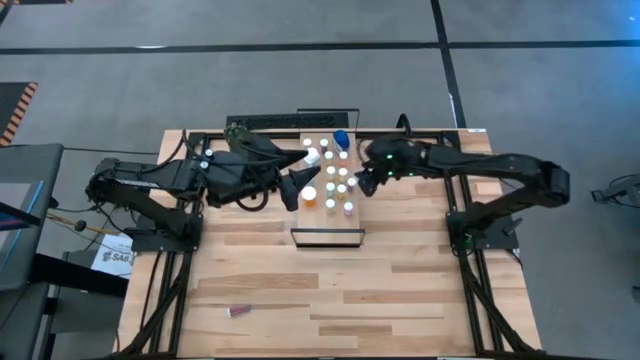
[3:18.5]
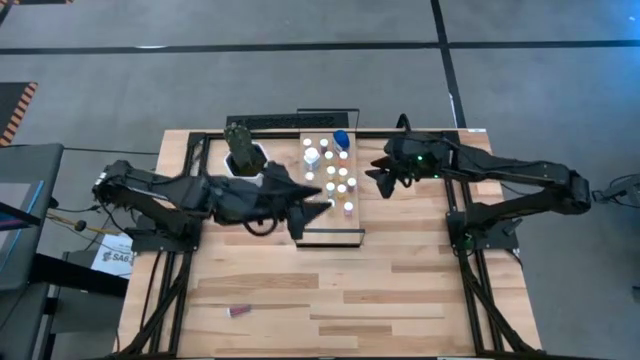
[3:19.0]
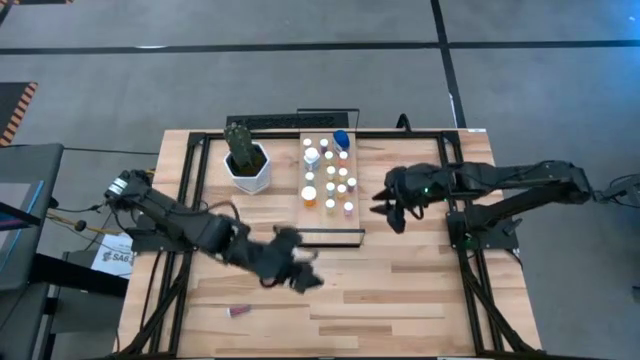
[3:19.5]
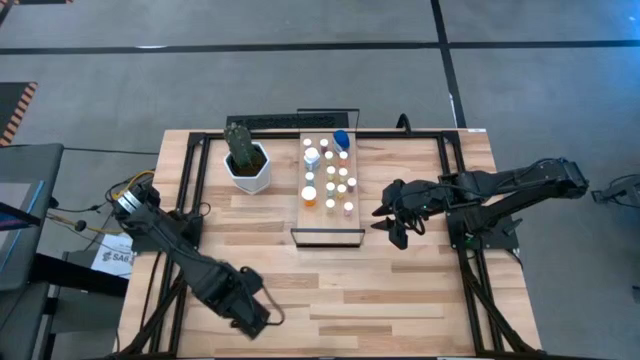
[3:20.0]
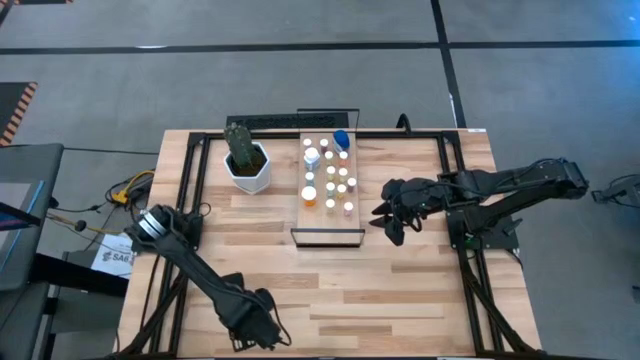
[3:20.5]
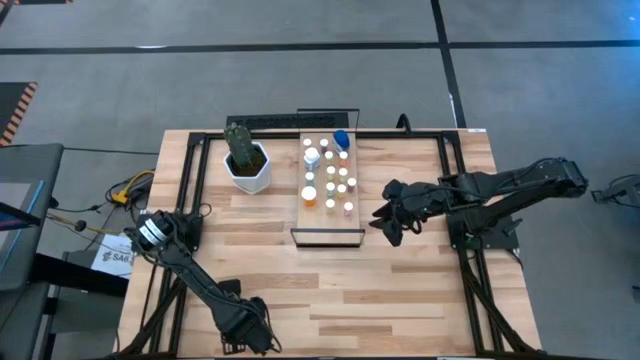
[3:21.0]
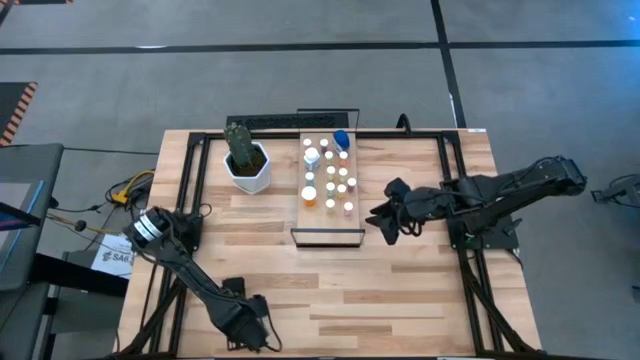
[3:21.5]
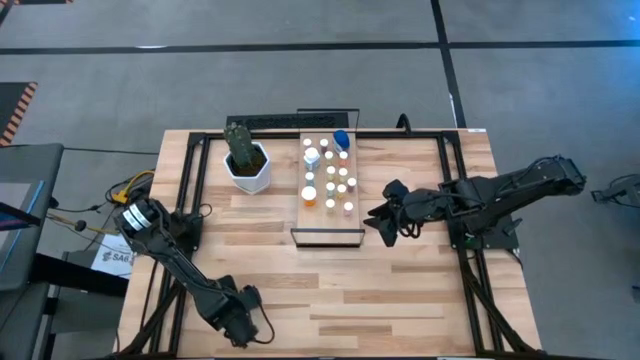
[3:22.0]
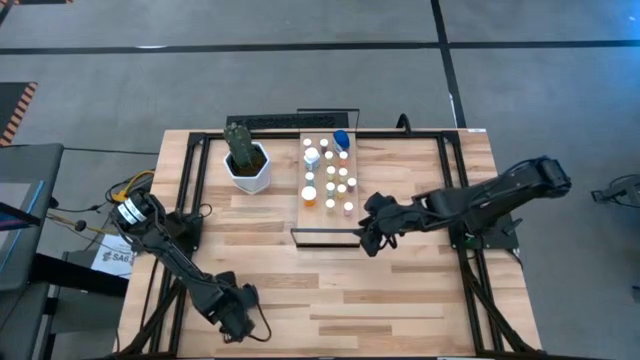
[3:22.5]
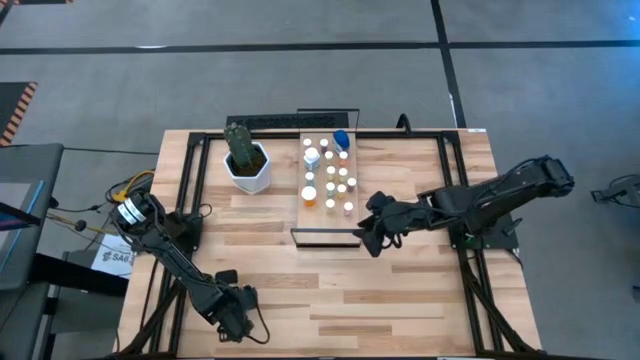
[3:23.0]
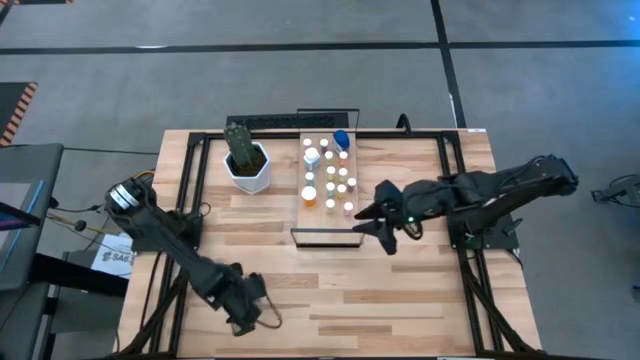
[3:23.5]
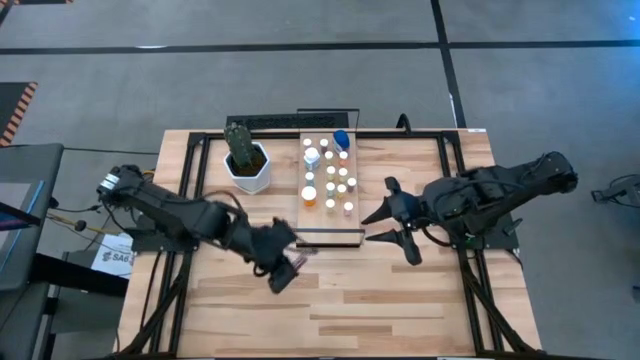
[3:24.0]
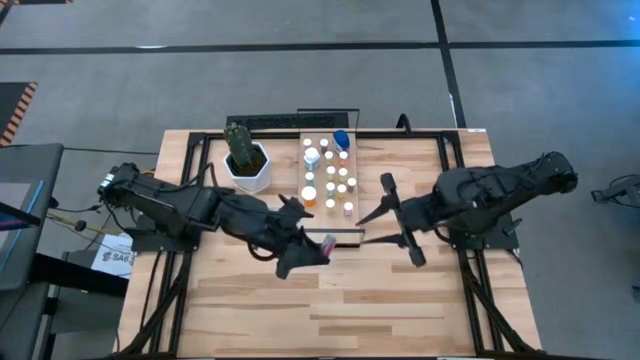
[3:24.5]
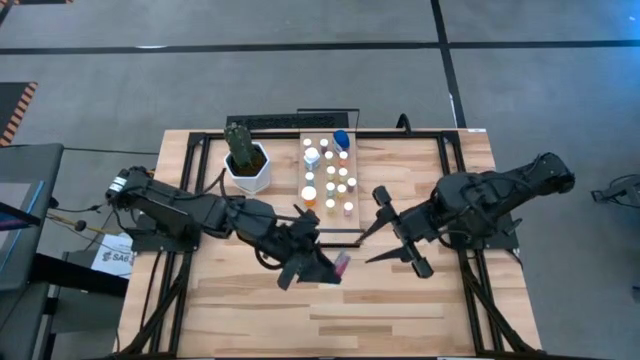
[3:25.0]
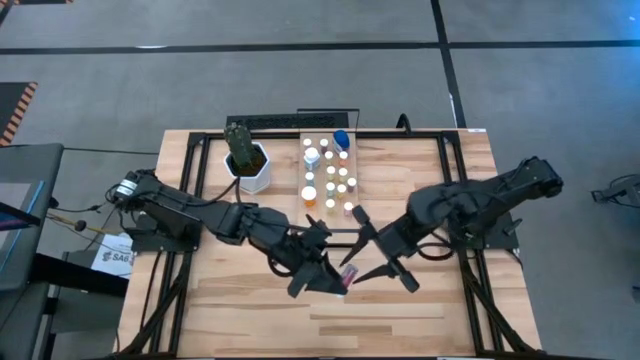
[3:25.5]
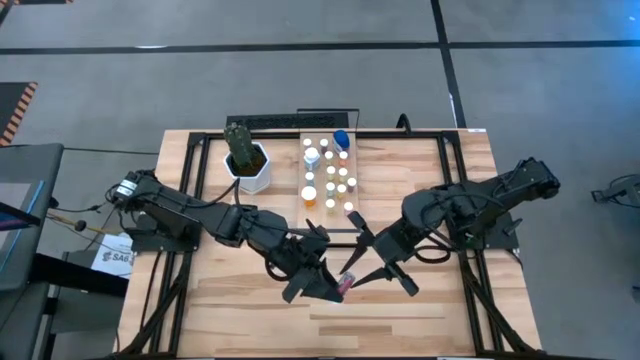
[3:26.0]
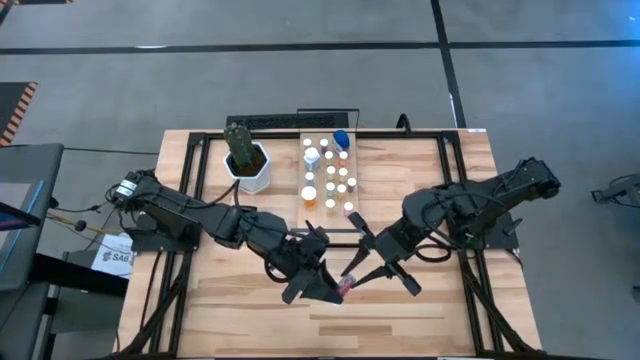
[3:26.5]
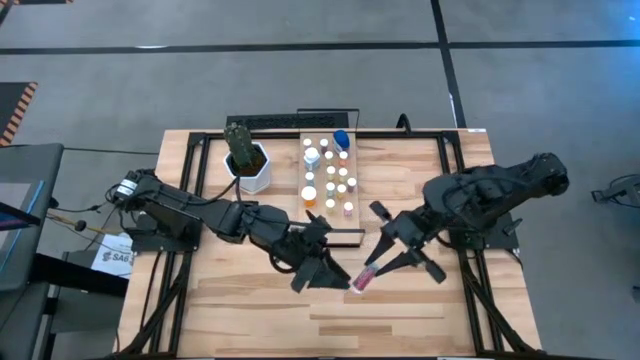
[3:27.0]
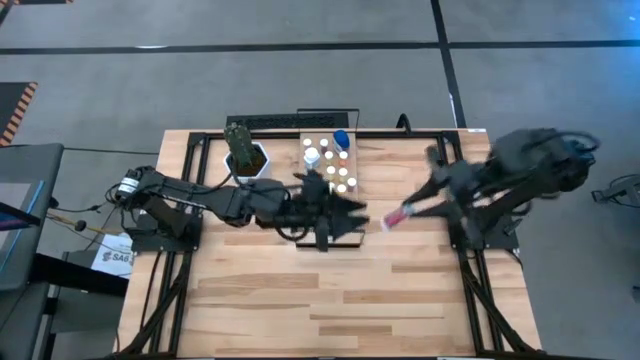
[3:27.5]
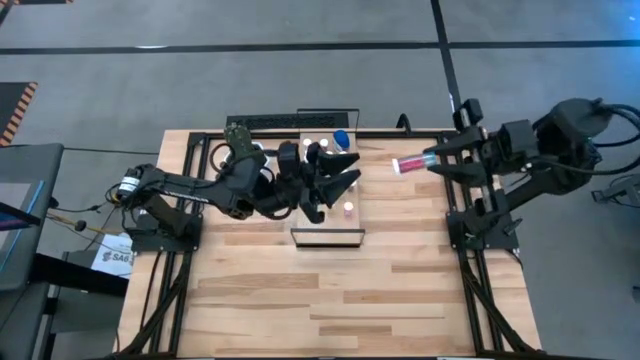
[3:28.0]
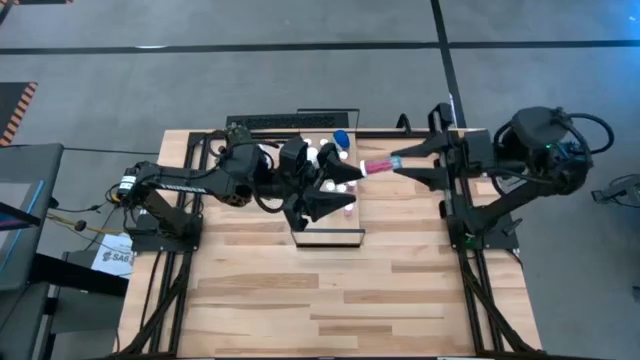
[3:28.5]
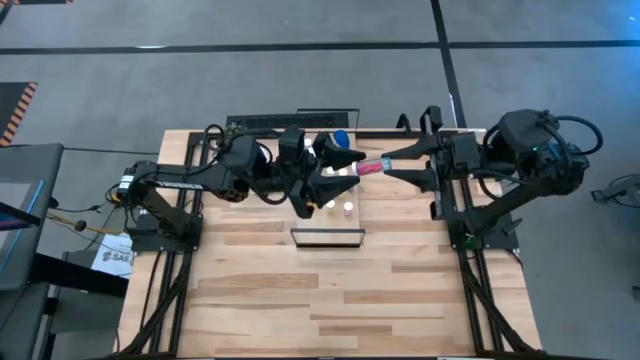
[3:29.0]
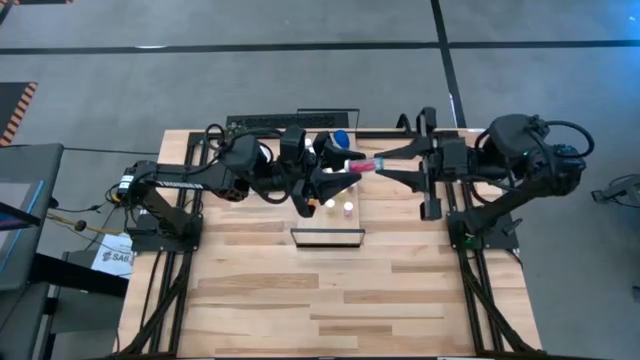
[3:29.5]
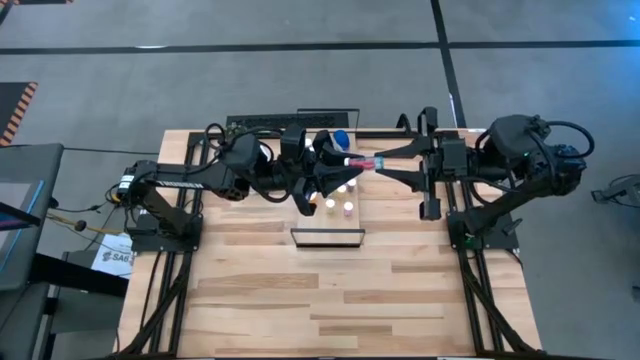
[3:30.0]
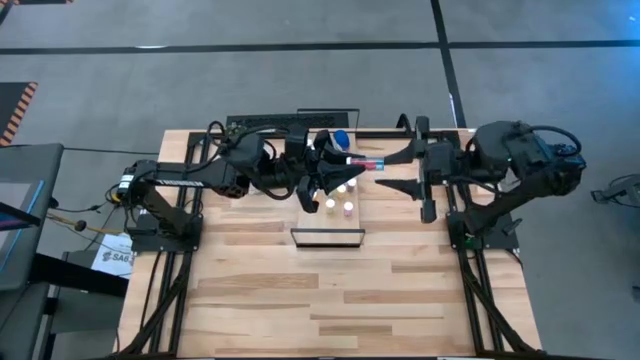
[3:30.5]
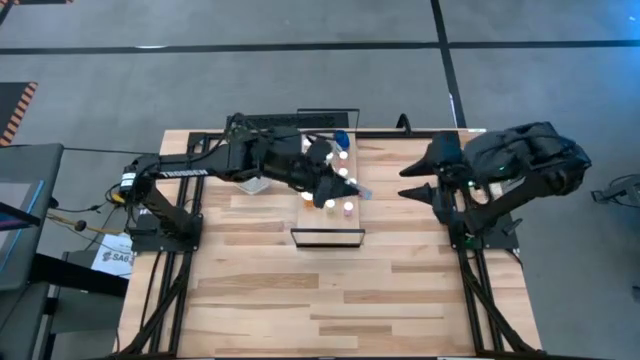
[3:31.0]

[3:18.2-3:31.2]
Task: Pick and place medicine bottles onto shelf by color
Put the blue pill bottle on the shelf

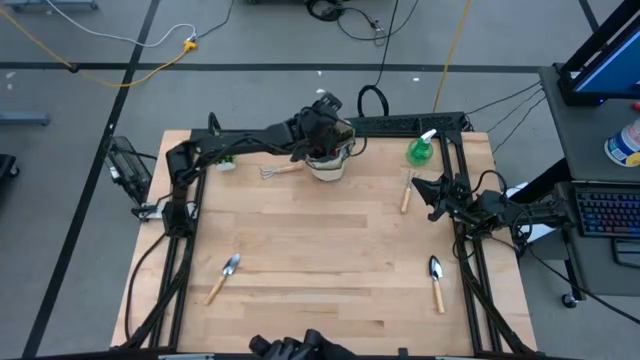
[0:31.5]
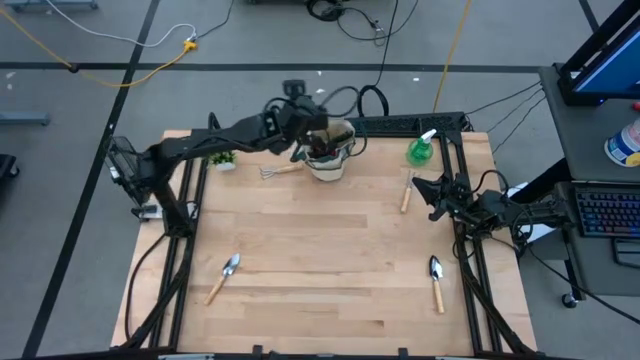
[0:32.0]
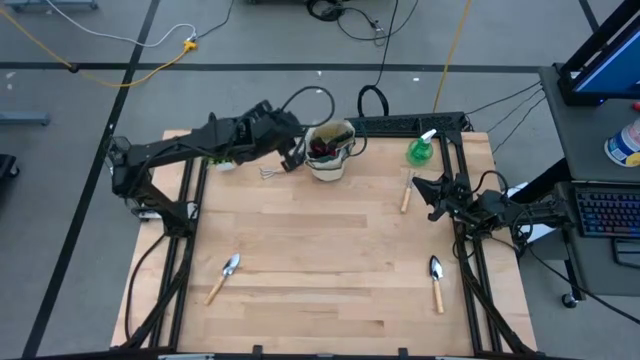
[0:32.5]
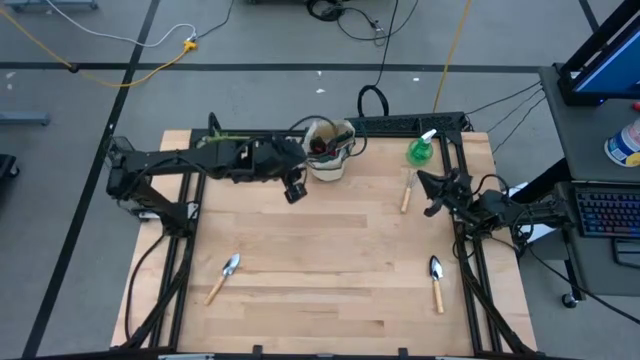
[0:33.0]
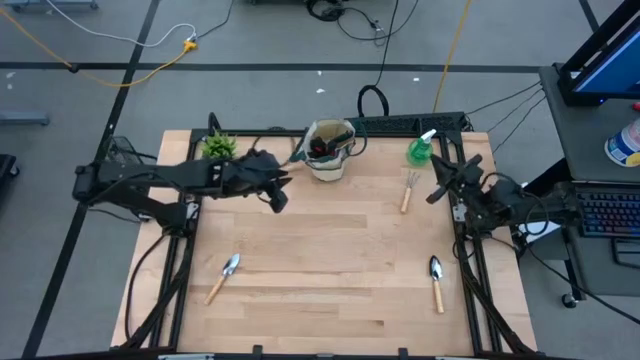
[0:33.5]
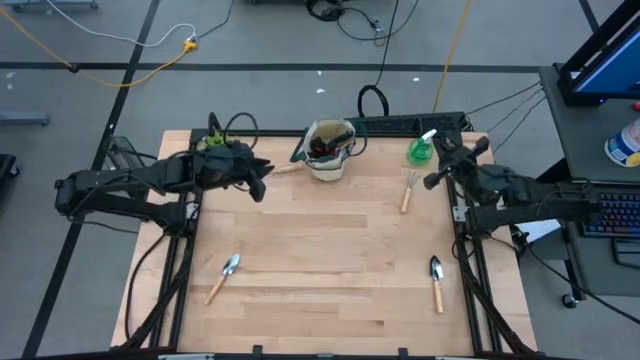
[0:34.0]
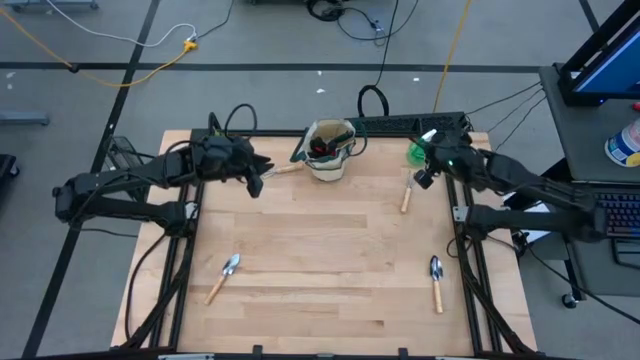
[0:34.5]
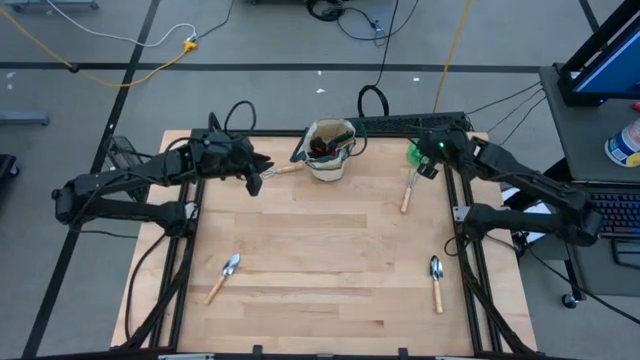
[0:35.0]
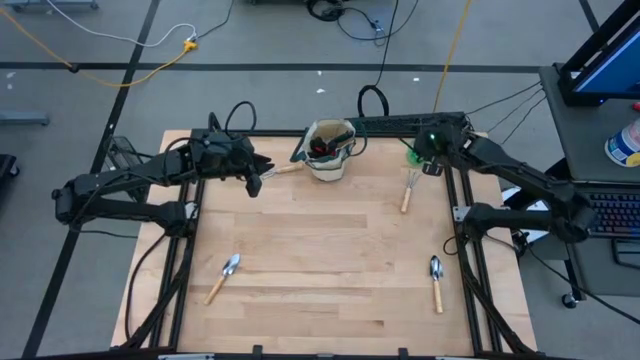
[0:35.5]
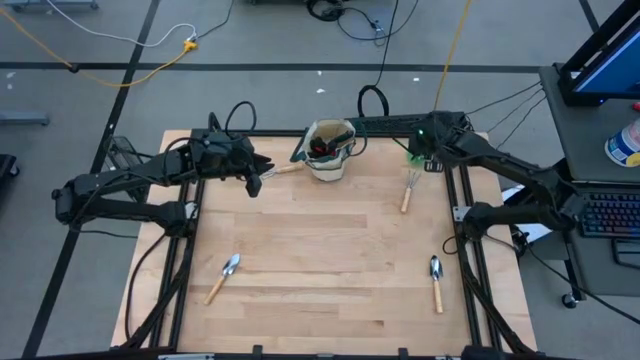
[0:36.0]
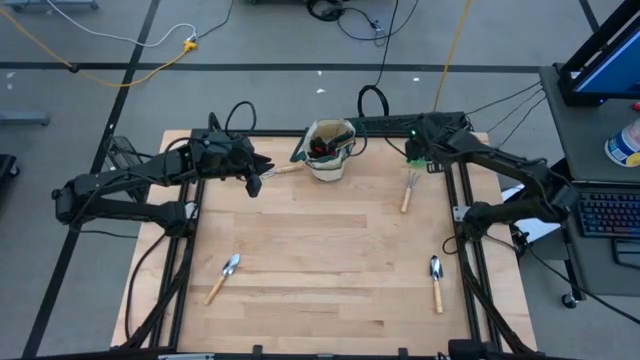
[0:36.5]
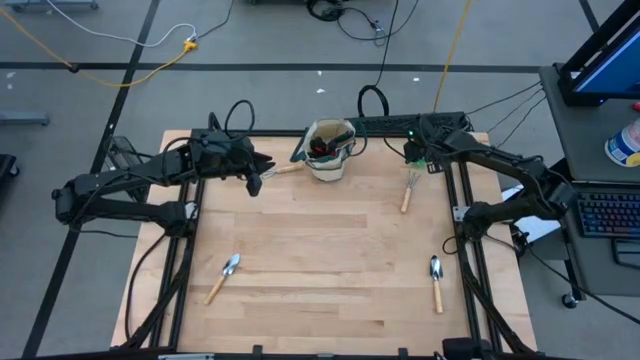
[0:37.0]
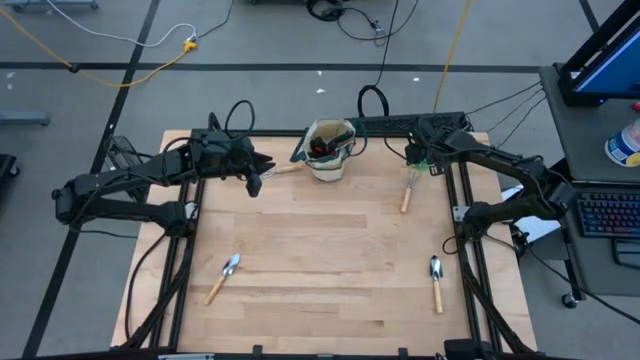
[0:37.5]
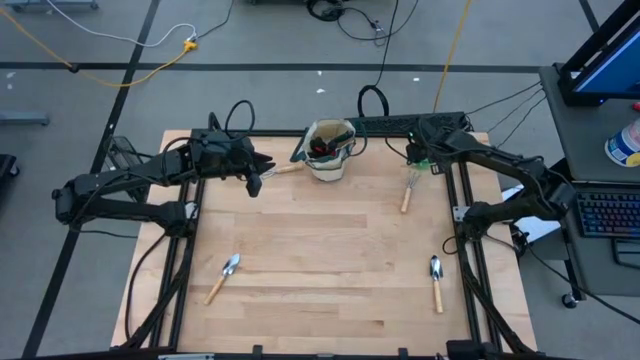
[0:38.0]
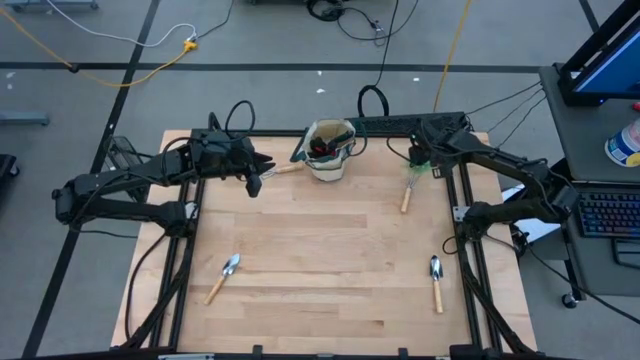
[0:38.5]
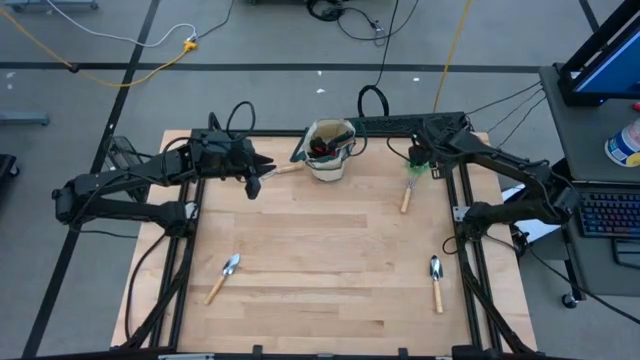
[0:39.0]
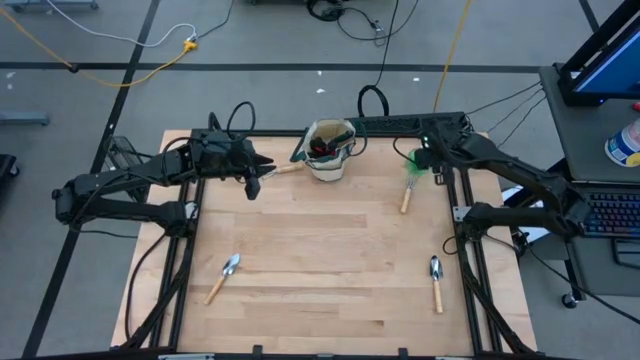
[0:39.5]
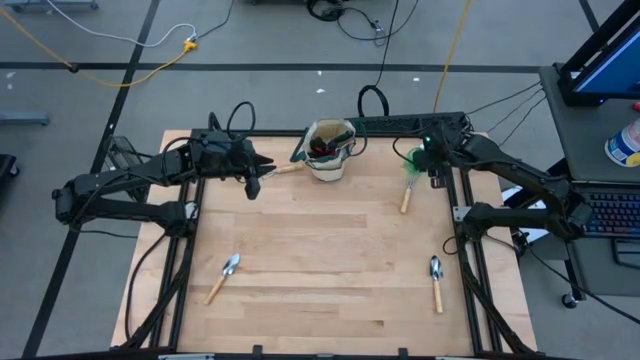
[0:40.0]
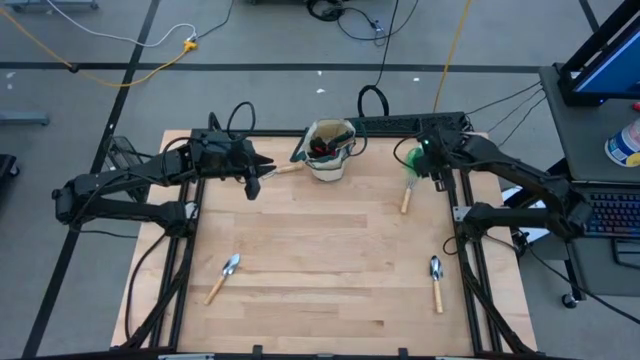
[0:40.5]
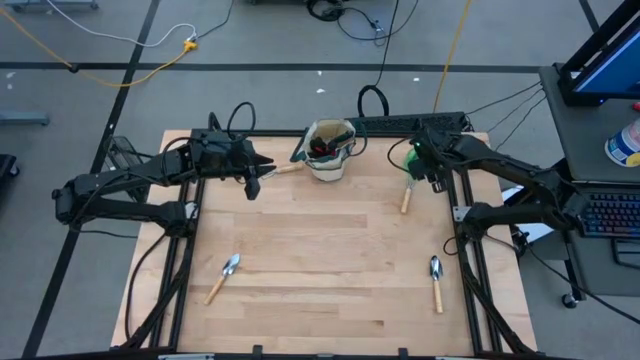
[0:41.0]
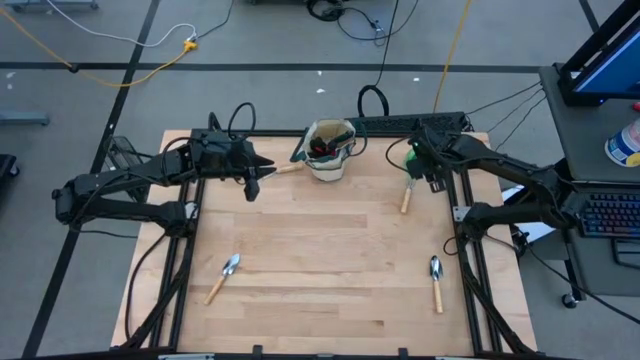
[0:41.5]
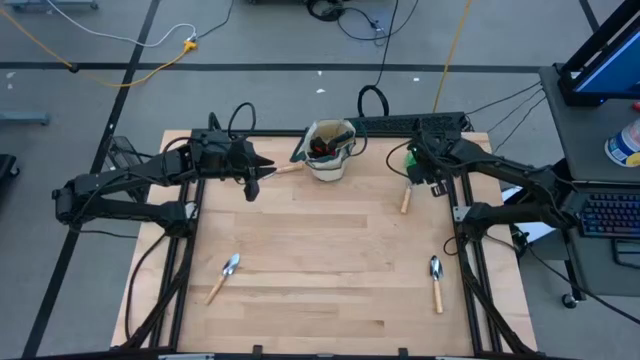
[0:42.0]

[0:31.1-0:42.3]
Task: Pick & Place Garden tools in Gardening bag
Put the green spray bottle into the green gardening bag
